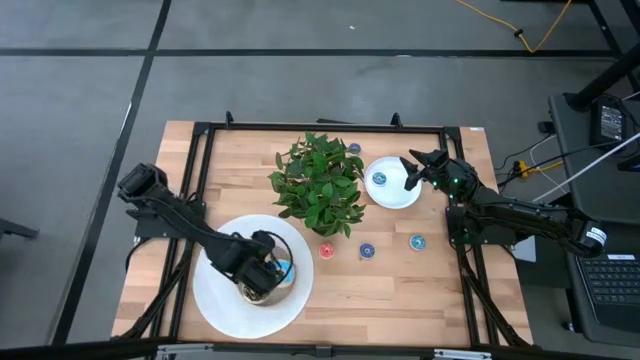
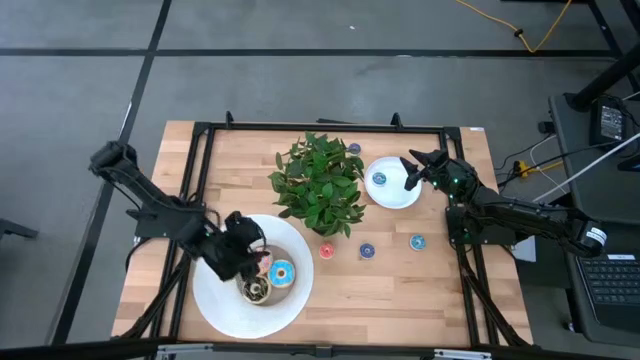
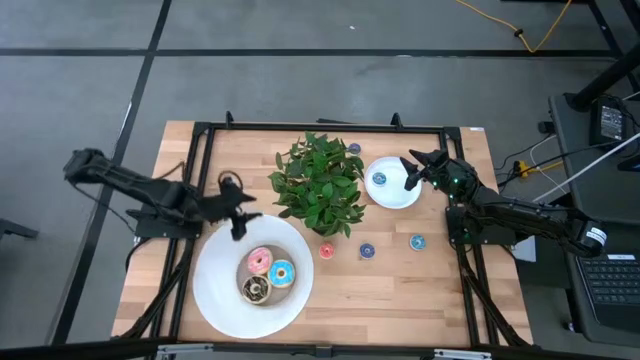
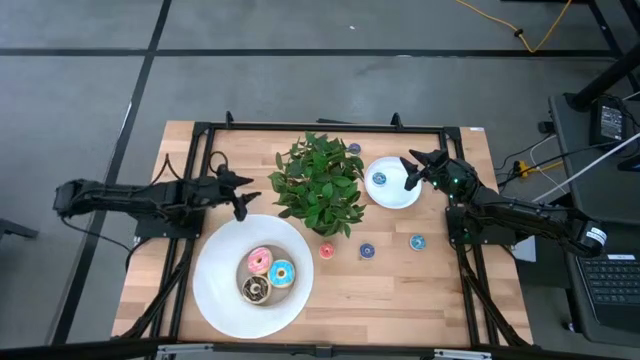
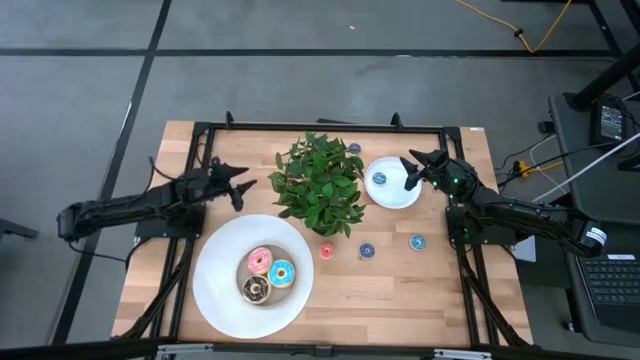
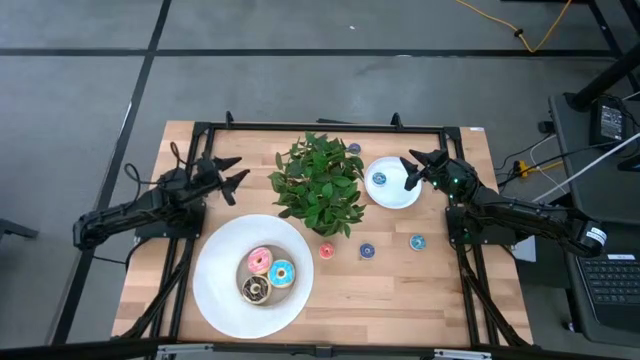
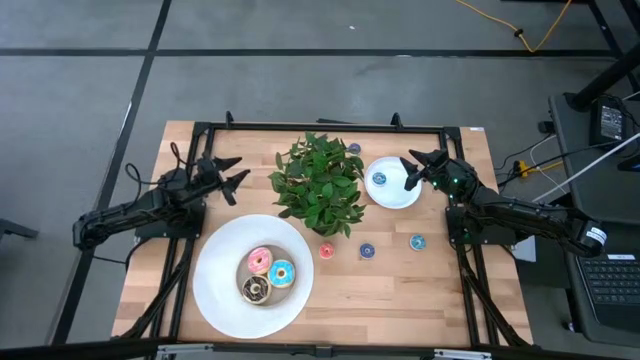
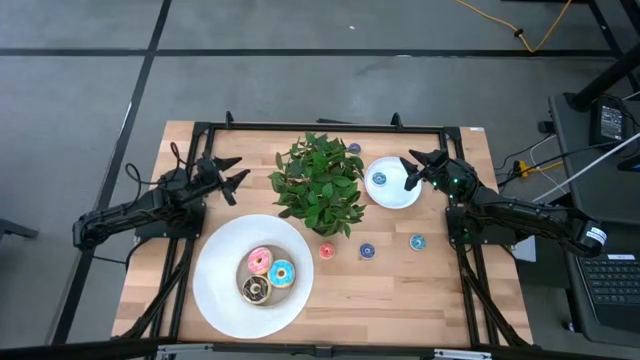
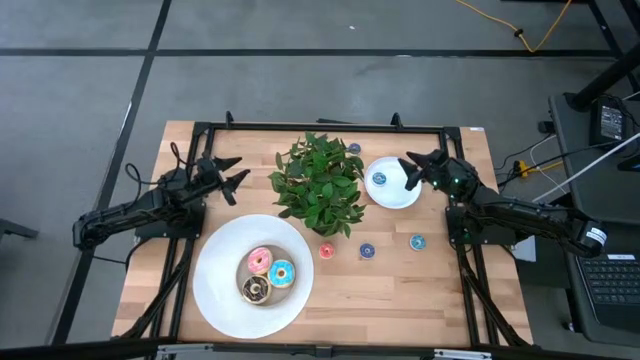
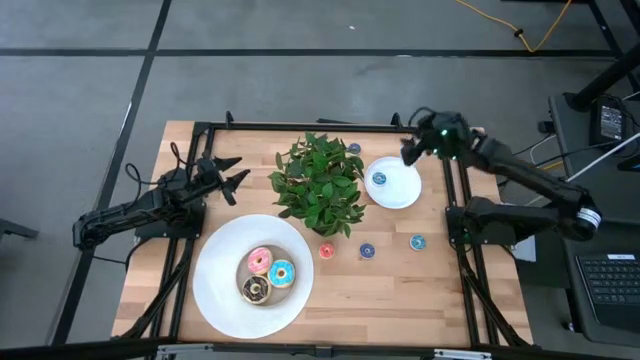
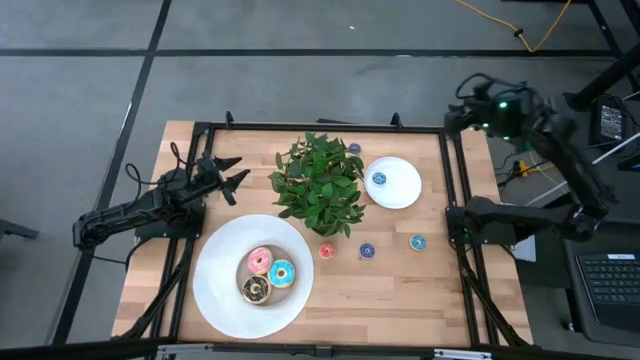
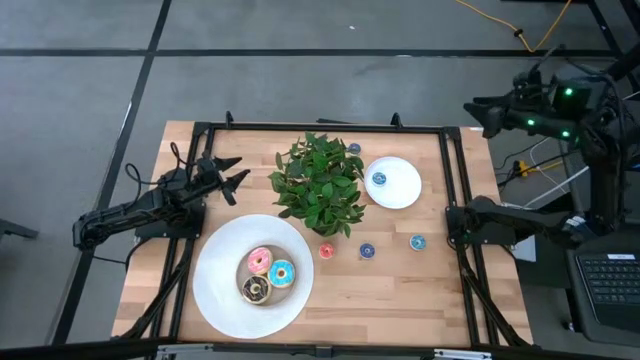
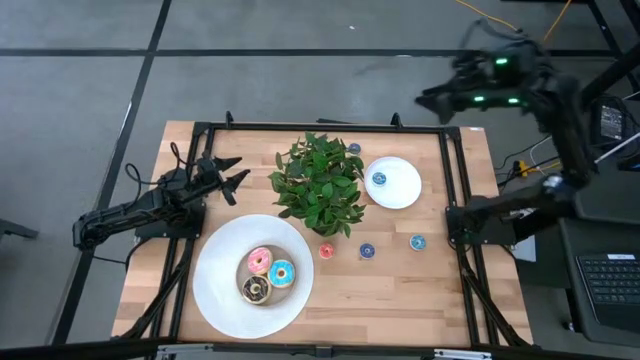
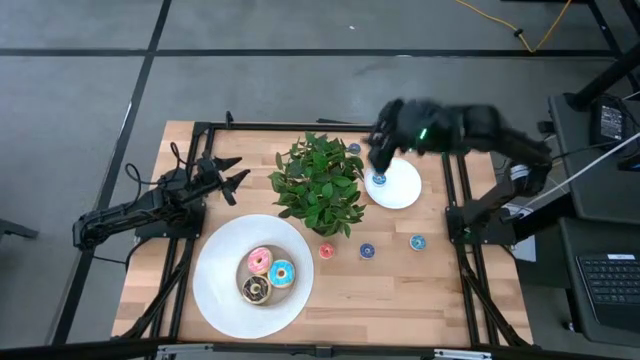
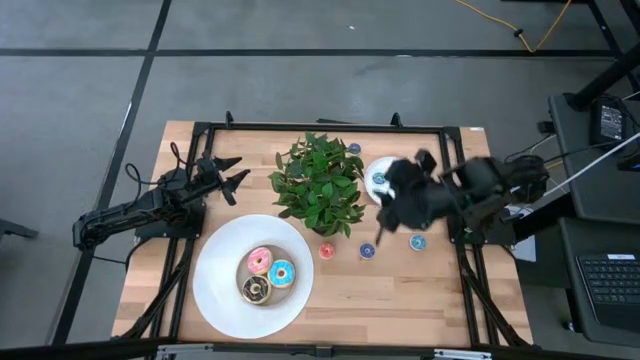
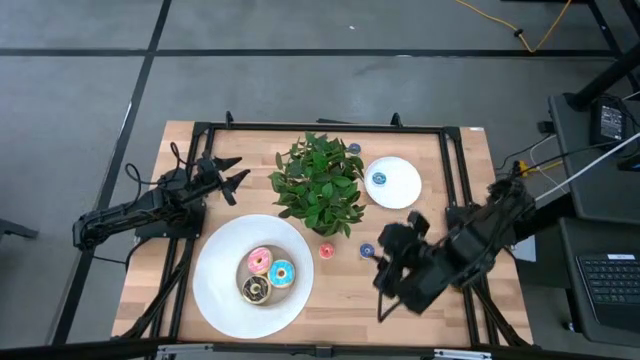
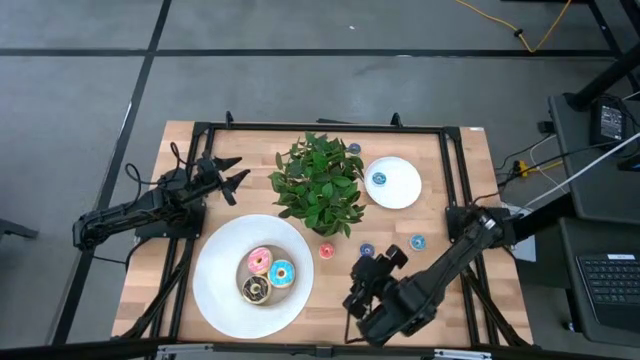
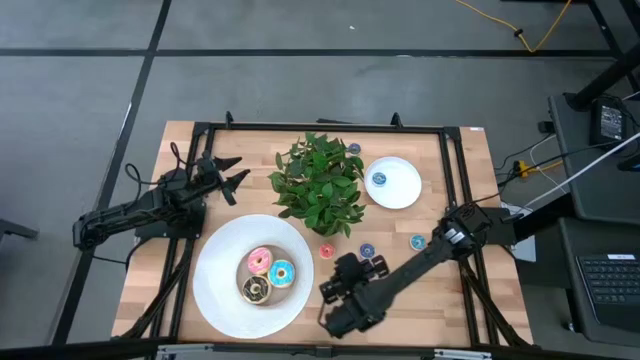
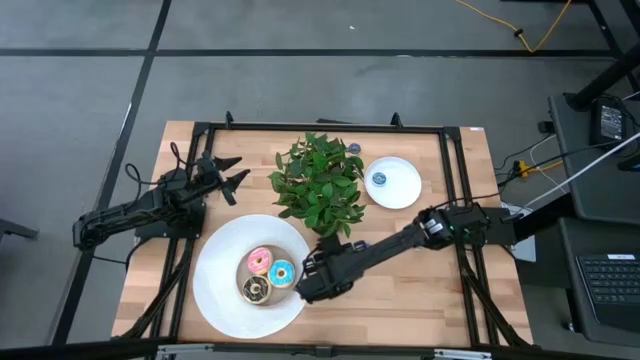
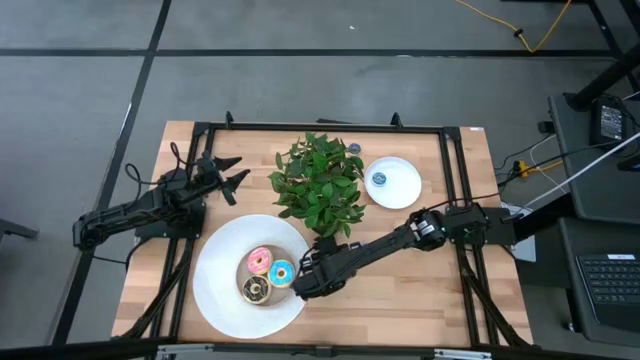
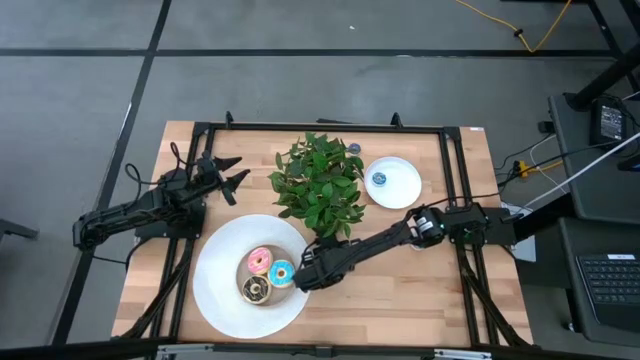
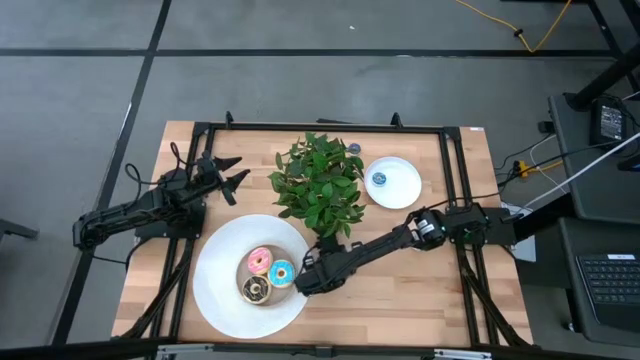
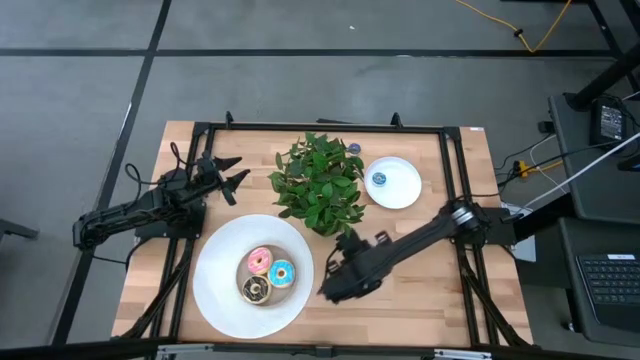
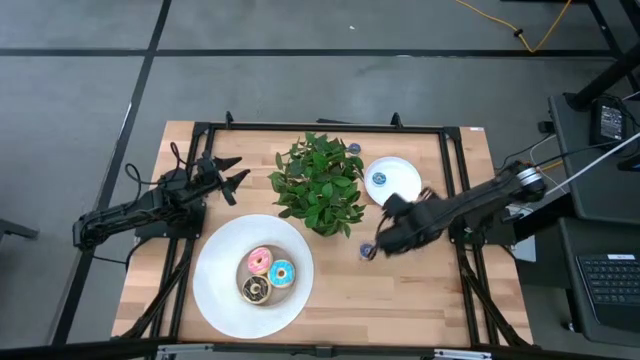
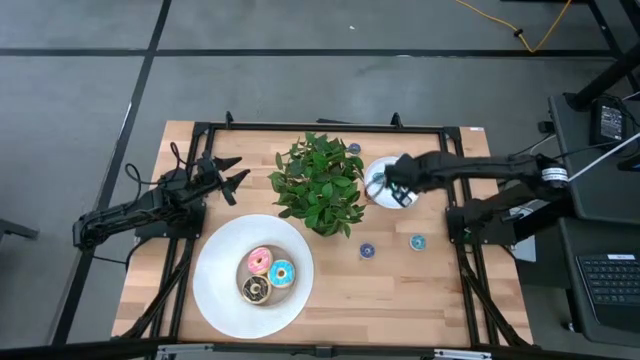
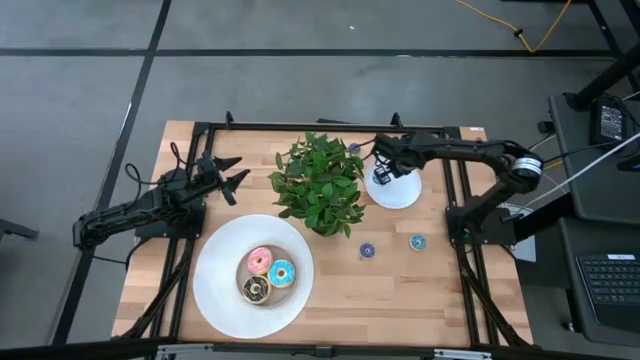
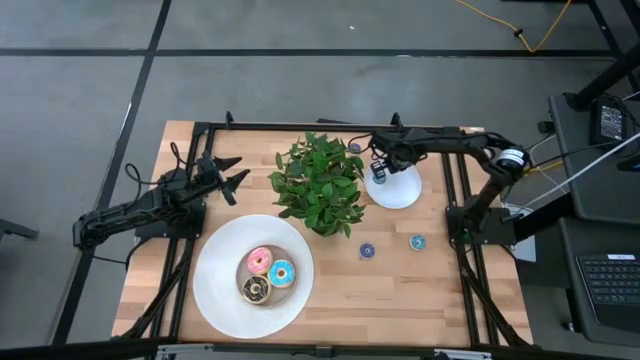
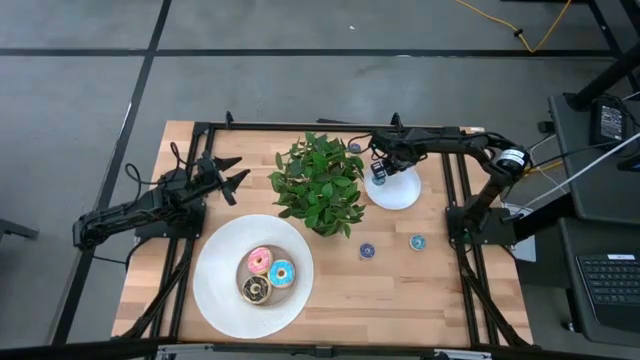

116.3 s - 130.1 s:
Task: Pick & Place donuts
Put the small red donut on the white plate

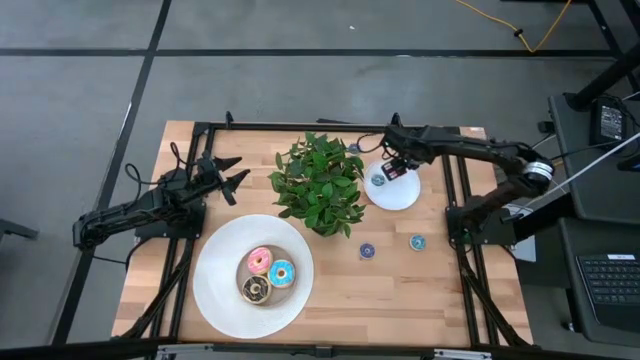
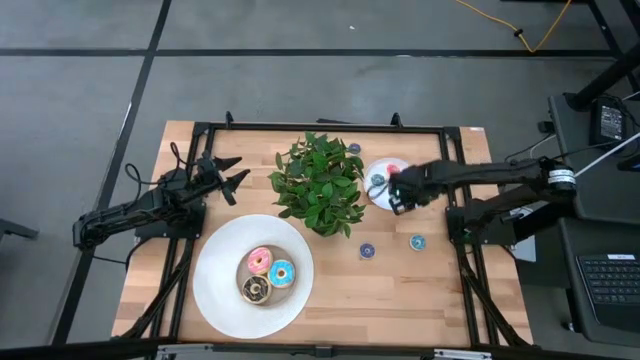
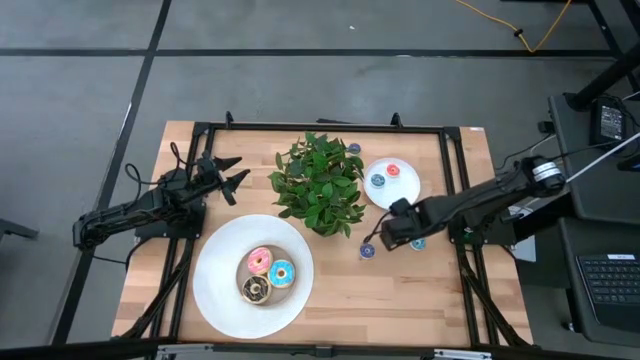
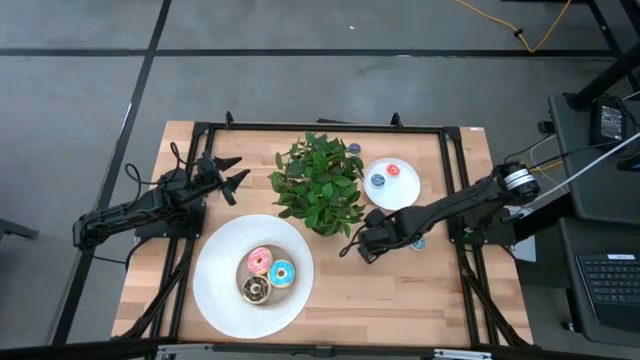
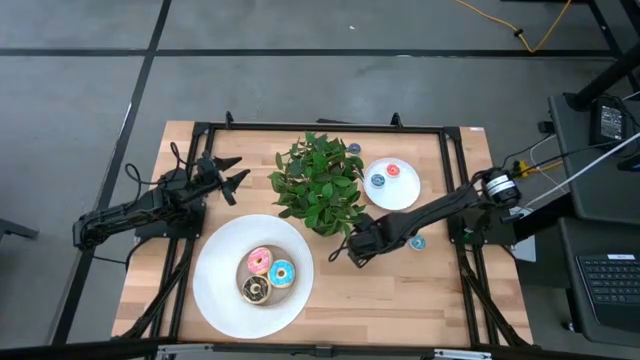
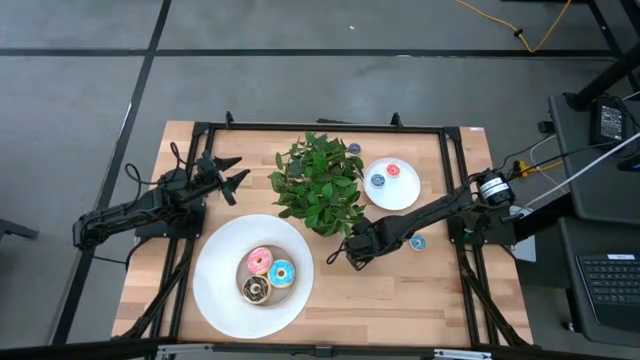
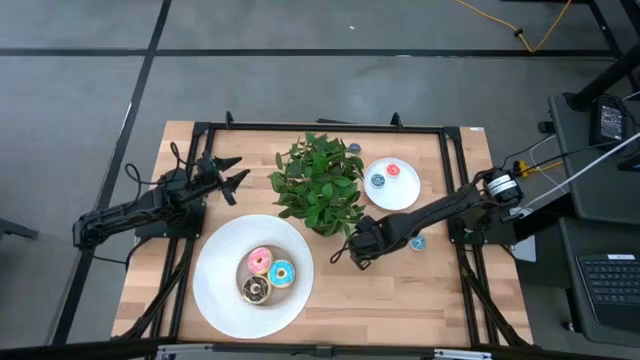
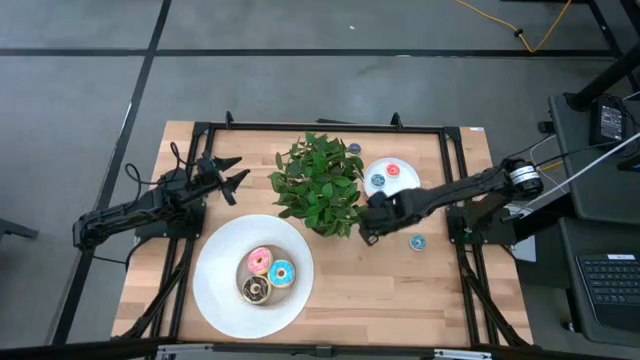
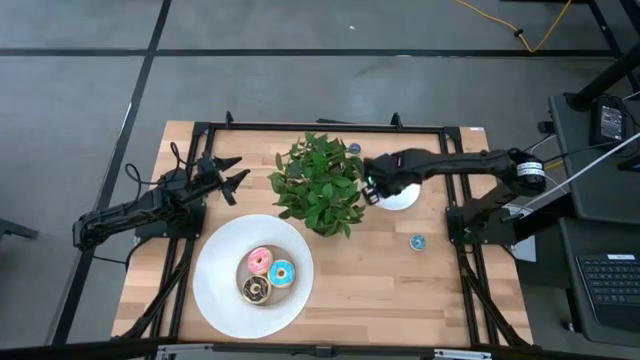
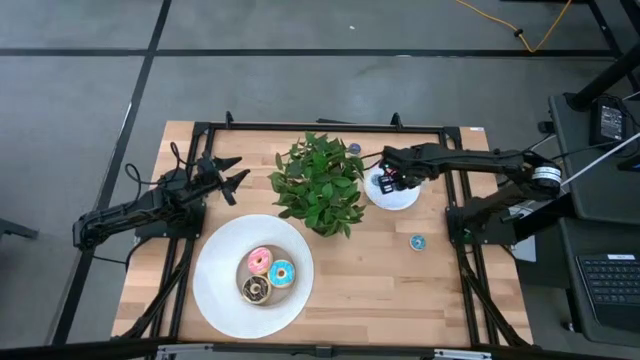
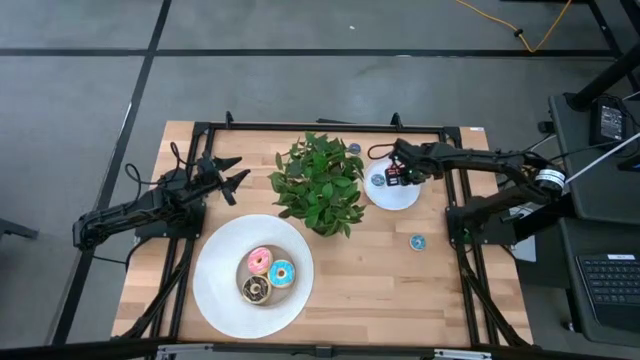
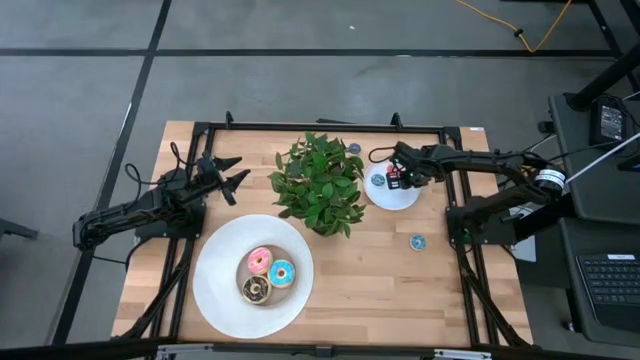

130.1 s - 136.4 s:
Put the small blue donut on the white plate
